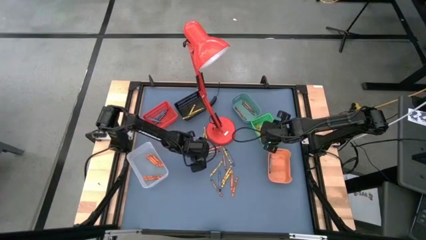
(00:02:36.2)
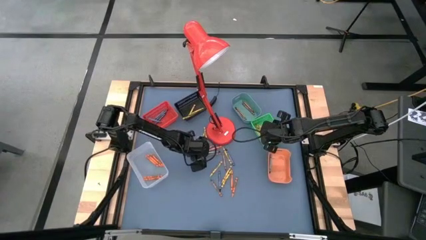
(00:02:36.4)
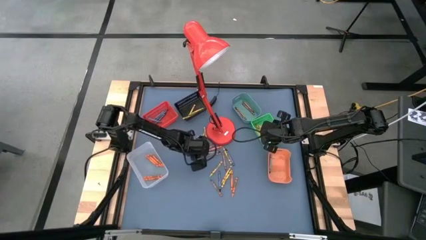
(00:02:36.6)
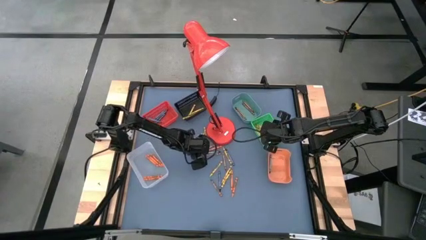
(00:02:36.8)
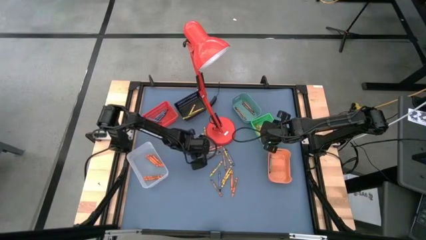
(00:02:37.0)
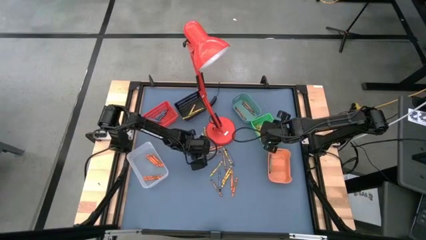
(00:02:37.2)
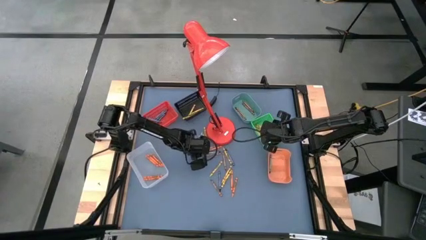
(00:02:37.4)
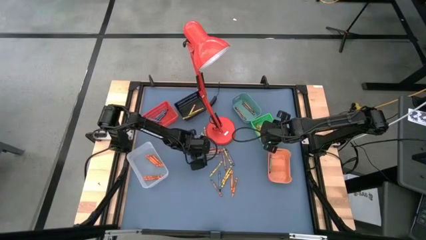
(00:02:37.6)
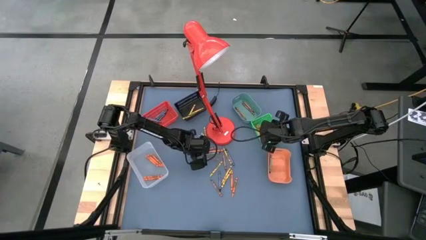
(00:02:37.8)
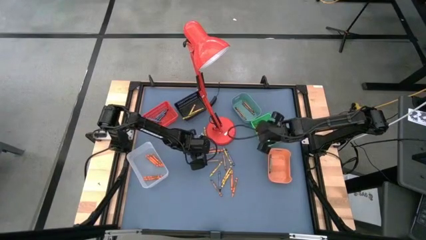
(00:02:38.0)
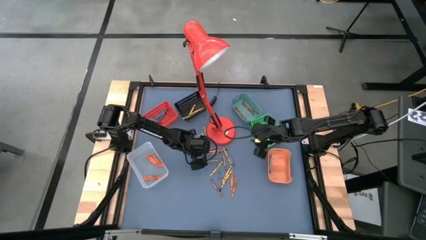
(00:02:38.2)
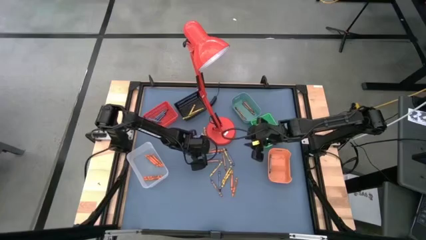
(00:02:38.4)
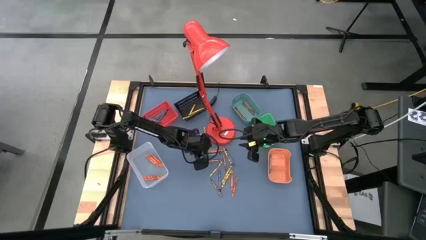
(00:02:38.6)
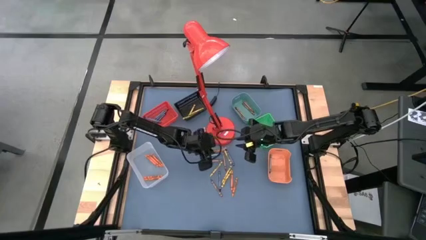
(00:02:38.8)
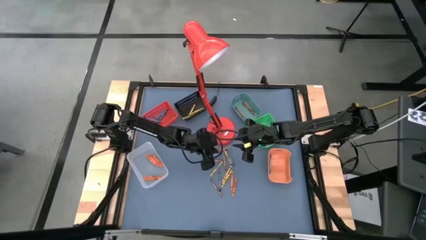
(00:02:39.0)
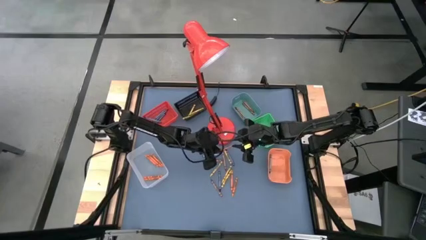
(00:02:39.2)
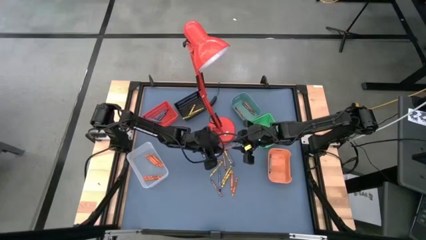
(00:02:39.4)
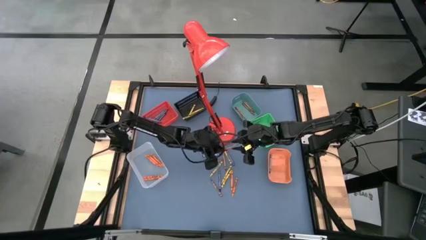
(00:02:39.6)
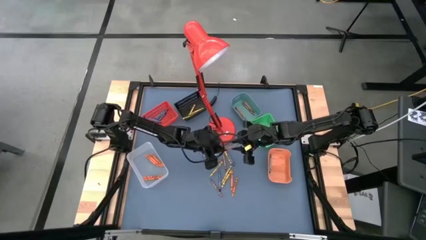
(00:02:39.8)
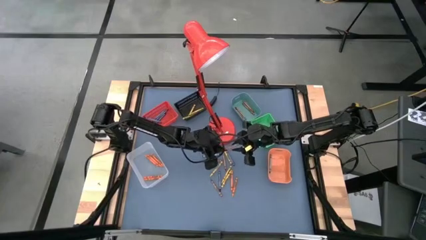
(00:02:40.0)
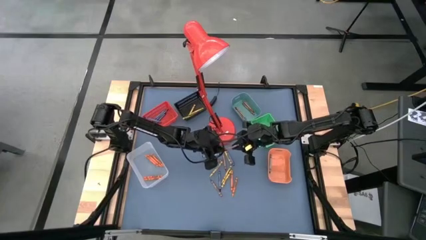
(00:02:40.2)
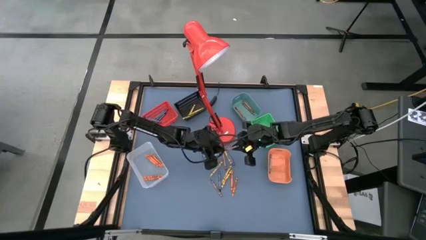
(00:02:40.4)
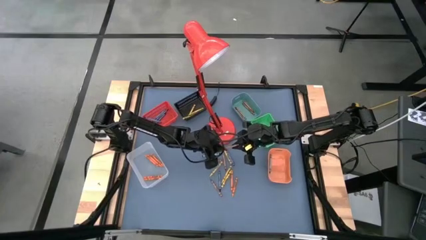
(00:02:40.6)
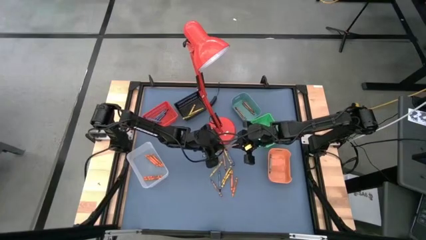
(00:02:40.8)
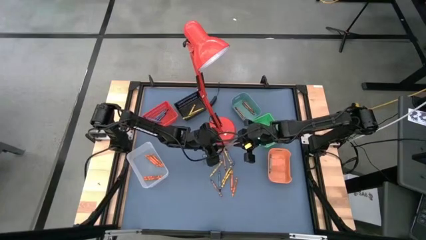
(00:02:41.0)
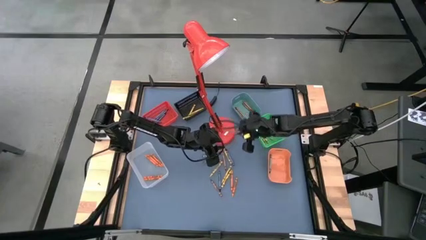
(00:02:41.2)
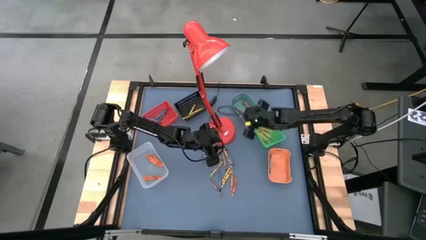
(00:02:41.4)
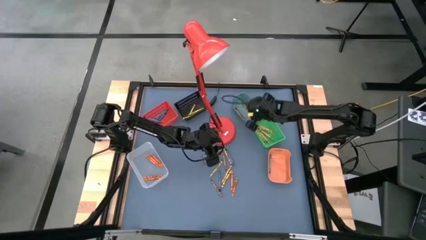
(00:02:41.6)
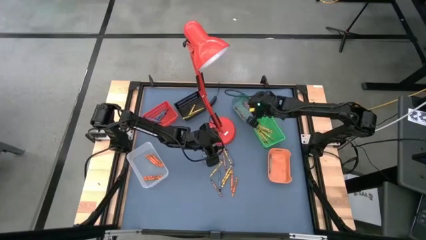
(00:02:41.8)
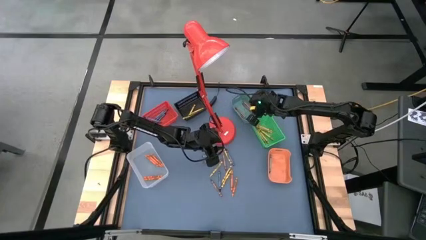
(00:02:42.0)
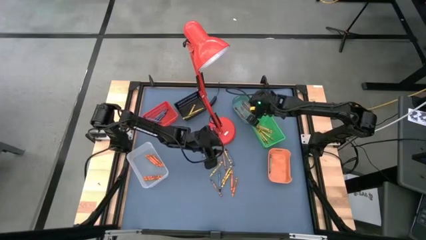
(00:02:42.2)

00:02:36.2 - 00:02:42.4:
Task: Sort crayons
Put the brown crayon into the top right blue bin

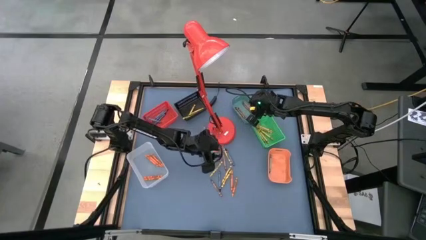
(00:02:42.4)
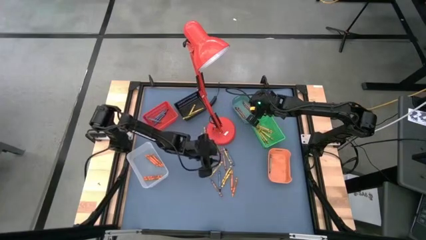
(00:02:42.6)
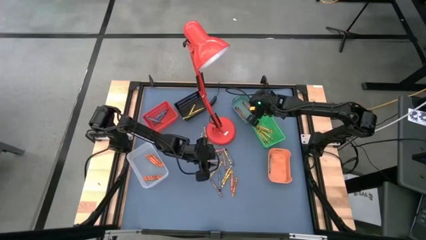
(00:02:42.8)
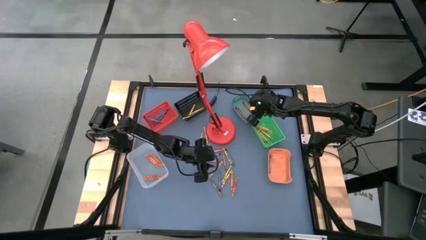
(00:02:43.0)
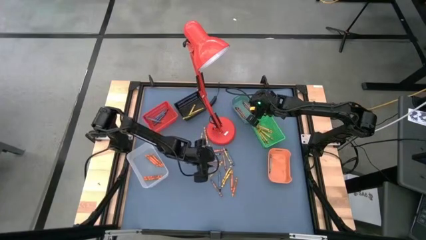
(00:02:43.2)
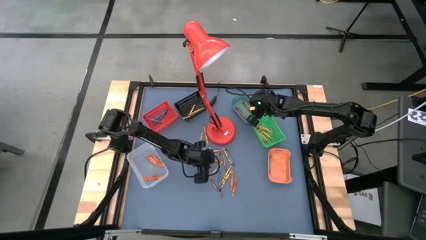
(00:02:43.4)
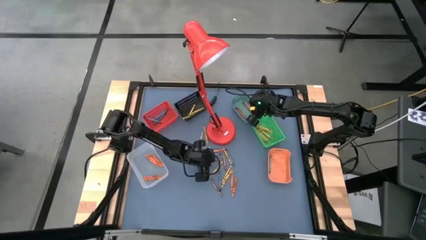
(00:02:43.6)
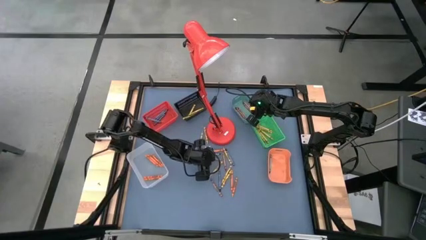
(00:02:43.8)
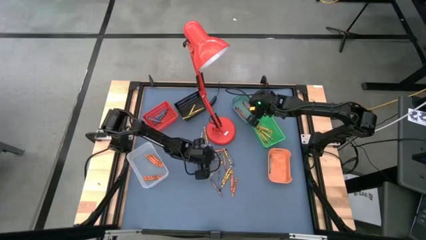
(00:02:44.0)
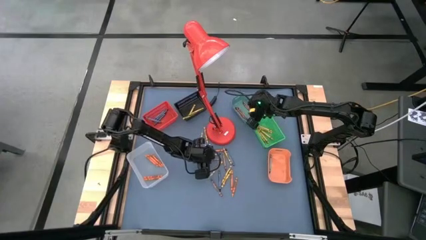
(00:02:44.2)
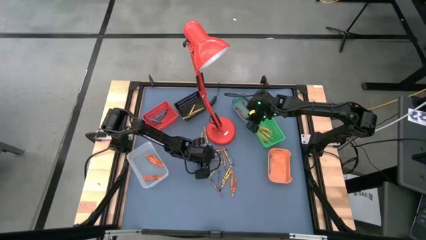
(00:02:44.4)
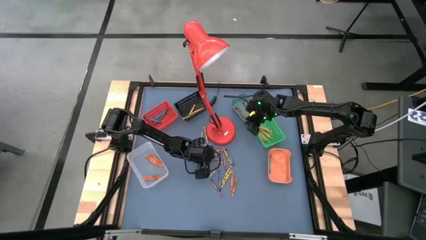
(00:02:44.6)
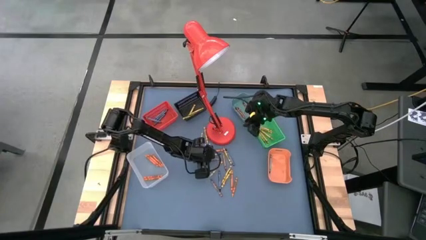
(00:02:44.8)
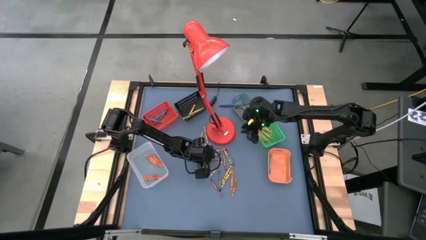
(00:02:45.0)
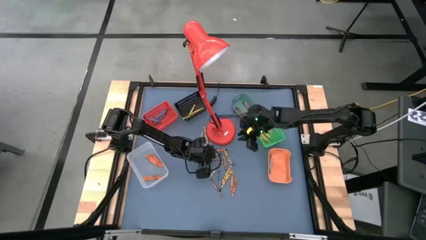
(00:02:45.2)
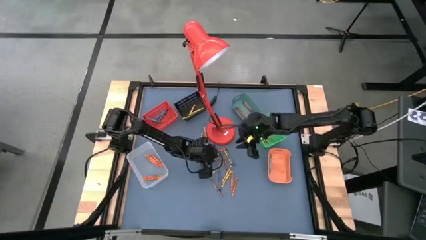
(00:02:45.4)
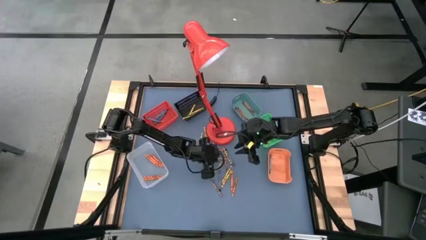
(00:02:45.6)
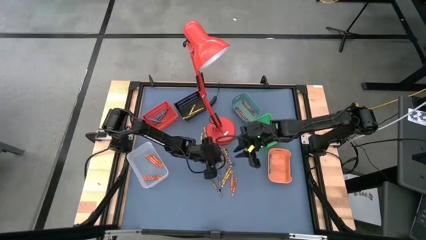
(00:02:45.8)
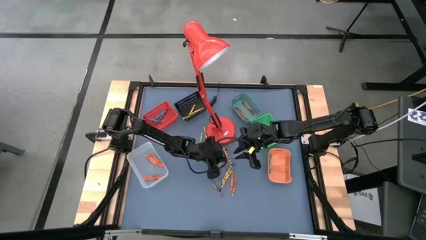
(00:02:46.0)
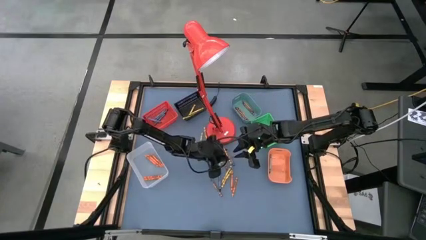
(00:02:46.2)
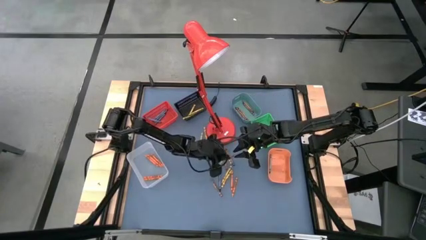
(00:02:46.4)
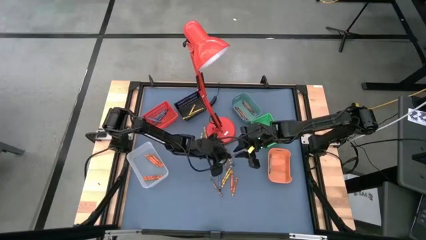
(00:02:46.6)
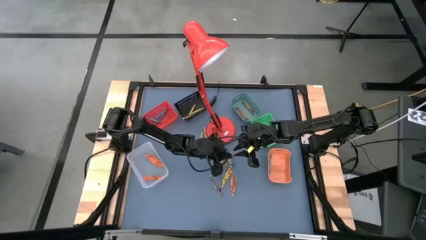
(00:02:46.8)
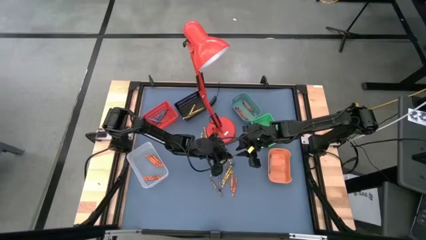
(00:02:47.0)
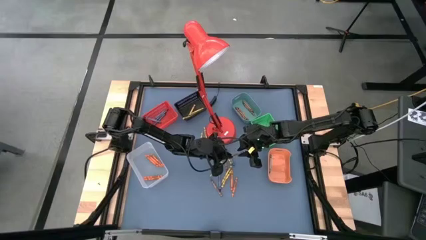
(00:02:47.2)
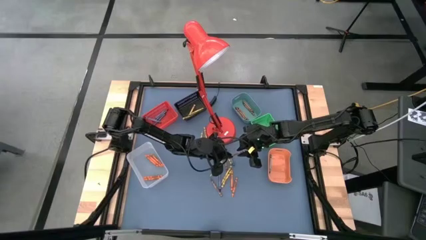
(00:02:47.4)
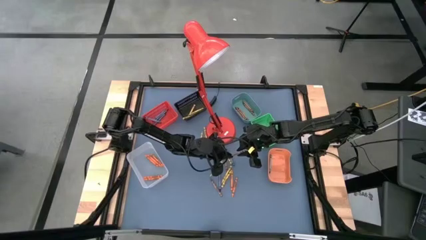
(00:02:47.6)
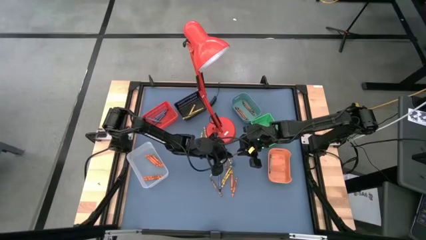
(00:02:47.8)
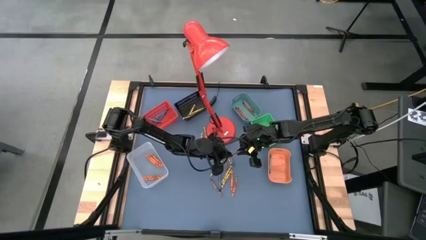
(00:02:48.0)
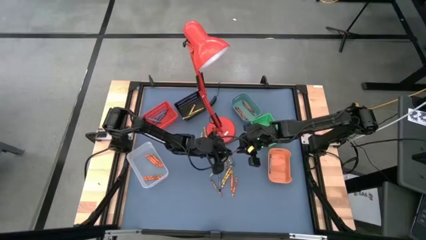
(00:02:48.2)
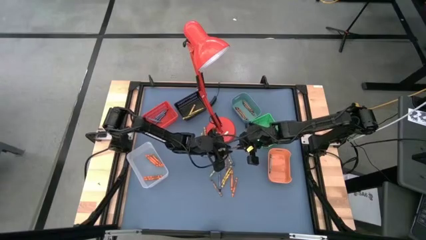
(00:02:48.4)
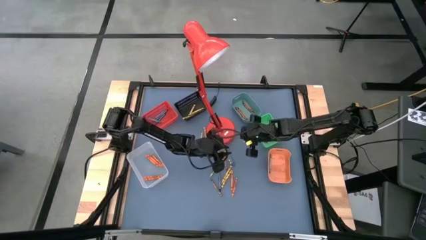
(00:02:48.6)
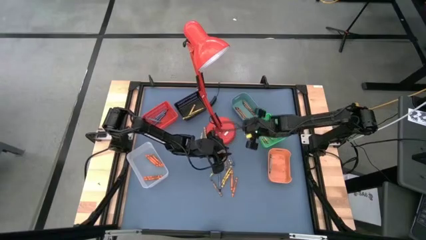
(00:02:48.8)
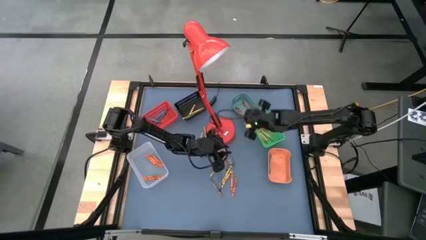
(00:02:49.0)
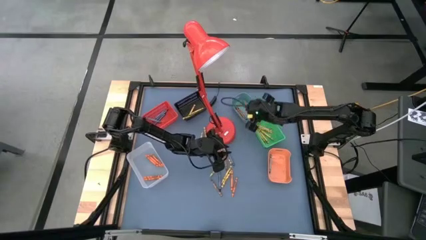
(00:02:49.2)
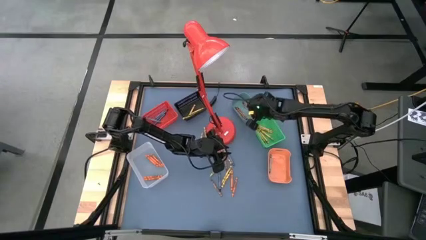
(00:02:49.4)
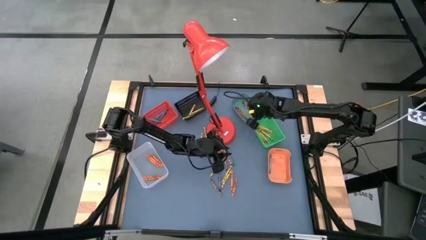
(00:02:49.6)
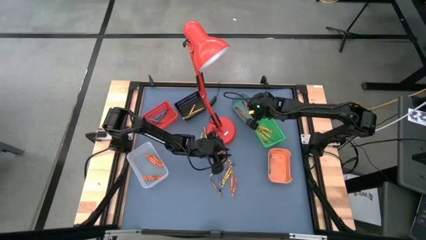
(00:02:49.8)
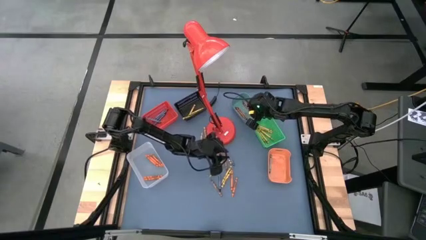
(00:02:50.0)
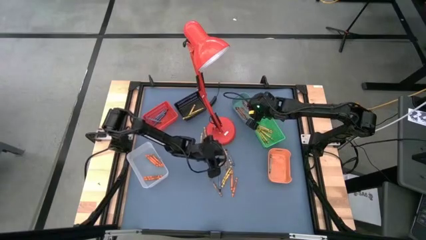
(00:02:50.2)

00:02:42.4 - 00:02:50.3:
Put the brown crayon into the top right blue bin

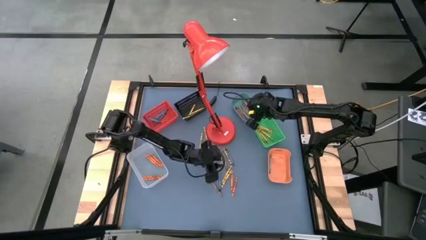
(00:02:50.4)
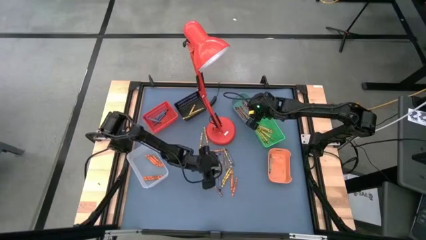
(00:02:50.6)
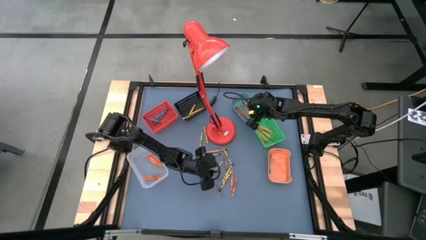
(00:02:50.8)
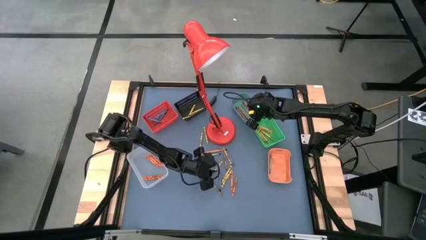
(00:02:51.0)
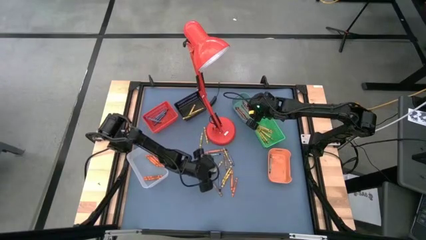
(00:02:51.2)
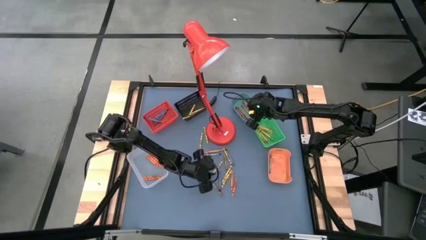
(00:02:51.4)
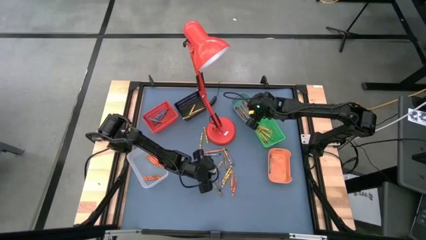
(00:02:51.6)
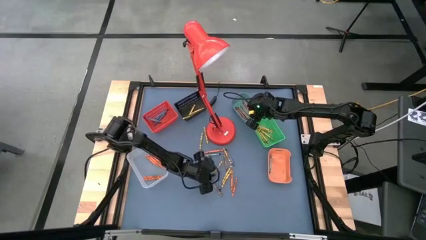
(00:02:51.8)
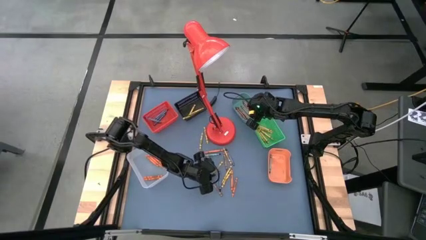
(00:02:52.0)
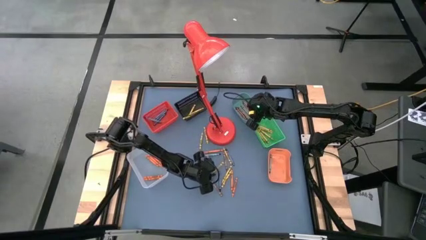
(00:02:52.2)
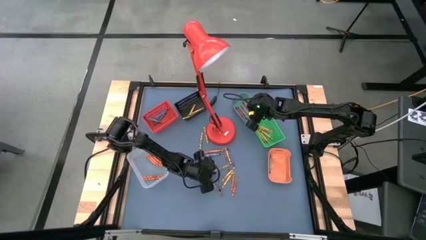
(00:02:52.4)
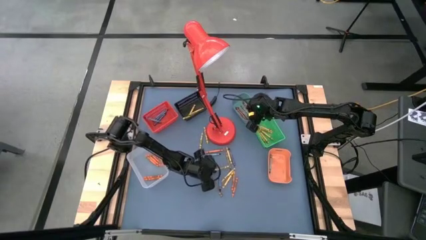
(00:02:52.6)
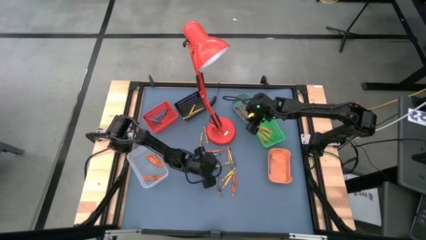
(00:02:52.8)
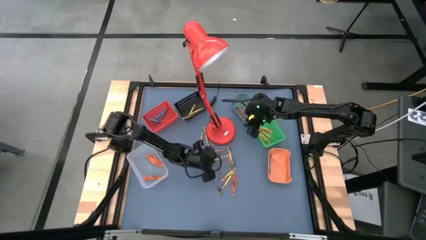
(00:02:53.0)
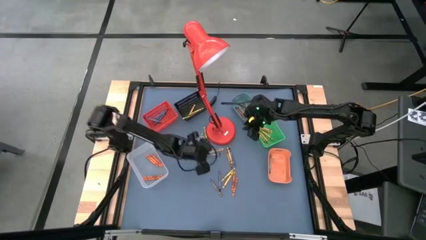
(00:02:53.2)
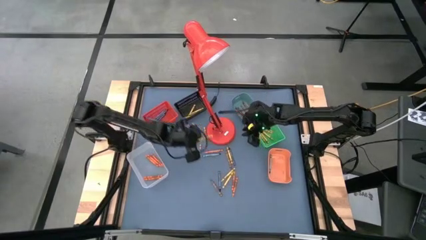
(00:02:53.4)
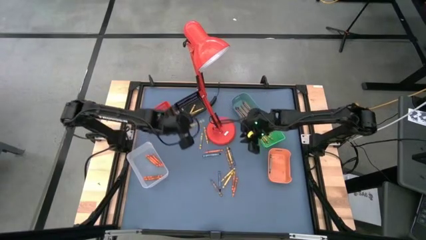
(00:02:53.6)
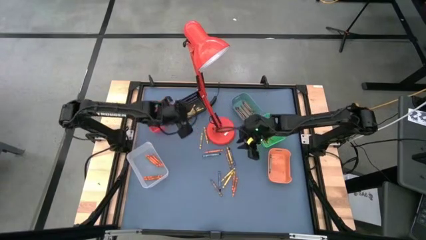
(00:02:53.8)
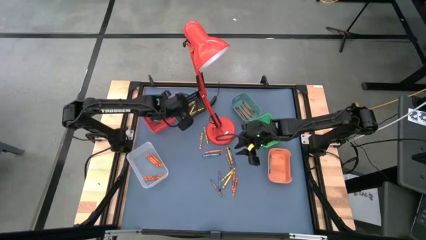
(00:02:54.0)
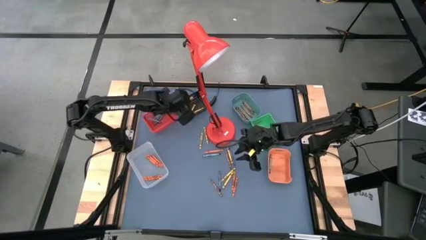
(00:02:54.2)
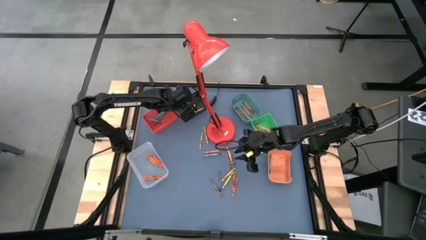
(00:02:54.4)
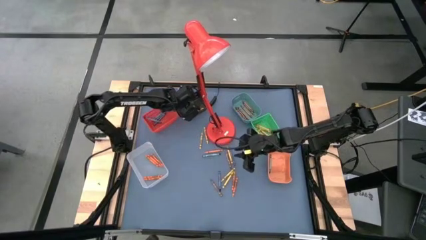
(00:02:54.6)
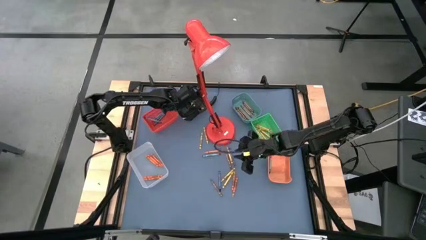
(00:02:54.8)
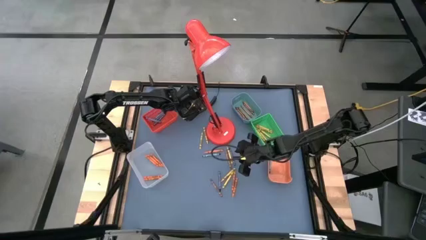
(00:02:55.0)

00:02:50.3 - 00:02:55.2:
Put the yellow crayon into the top left black bin
